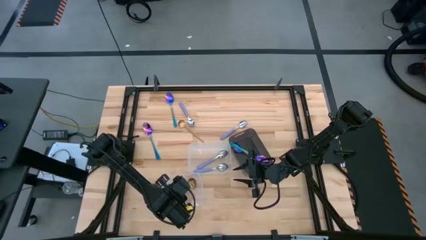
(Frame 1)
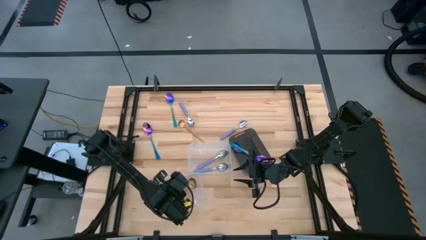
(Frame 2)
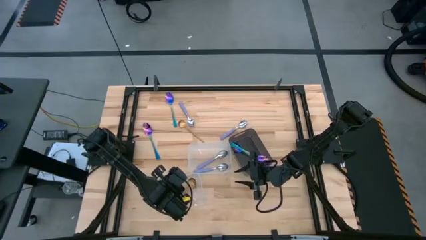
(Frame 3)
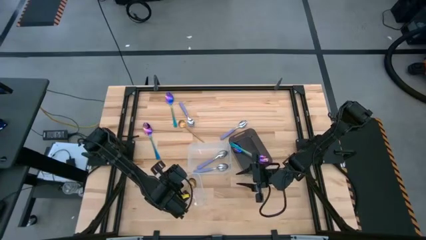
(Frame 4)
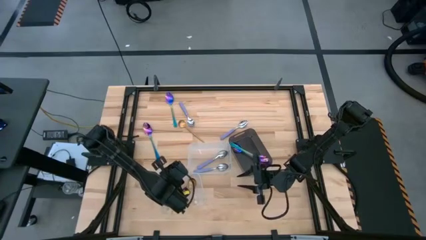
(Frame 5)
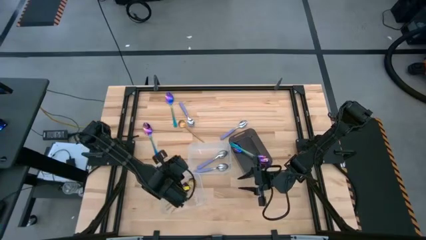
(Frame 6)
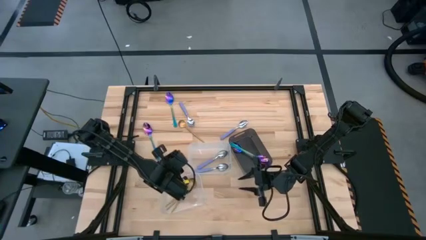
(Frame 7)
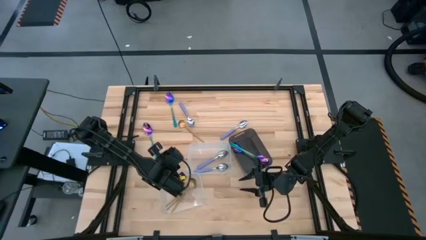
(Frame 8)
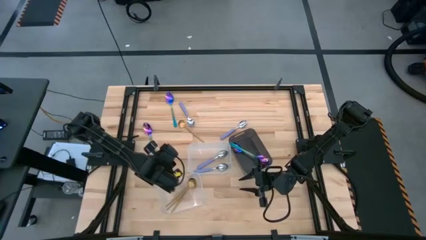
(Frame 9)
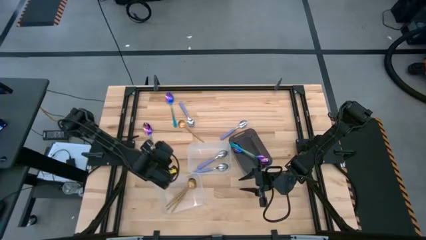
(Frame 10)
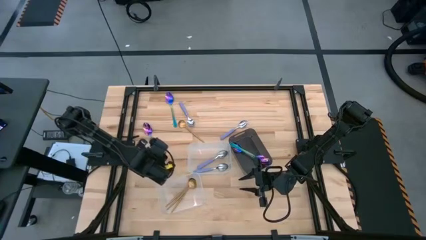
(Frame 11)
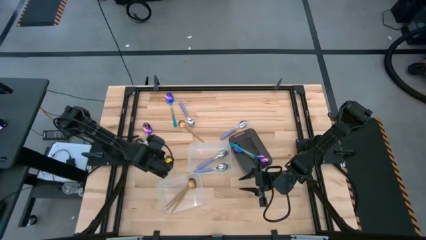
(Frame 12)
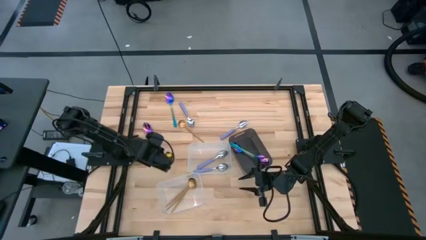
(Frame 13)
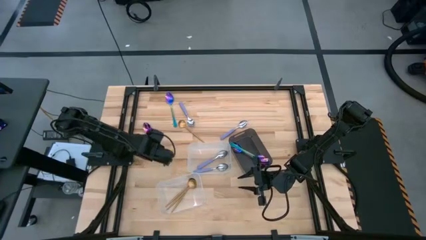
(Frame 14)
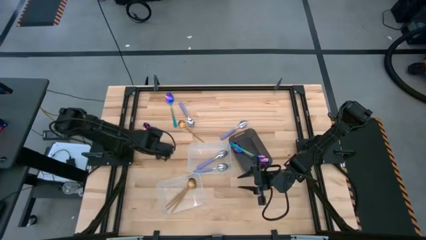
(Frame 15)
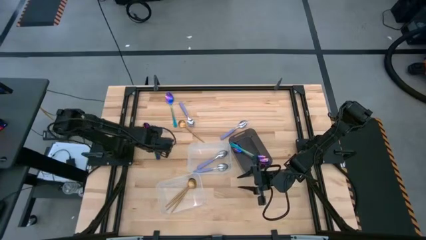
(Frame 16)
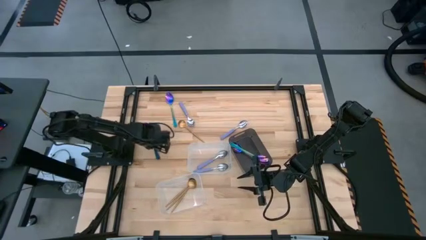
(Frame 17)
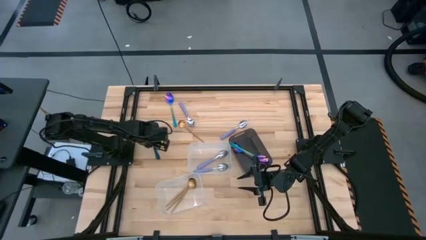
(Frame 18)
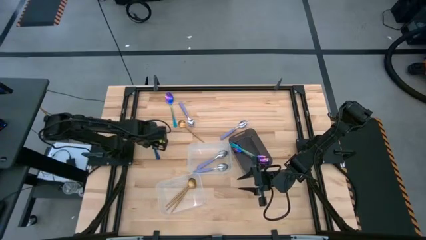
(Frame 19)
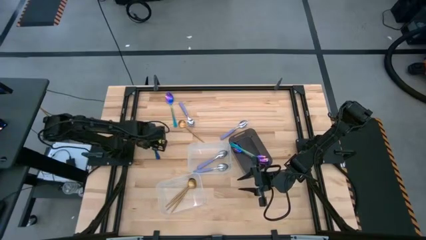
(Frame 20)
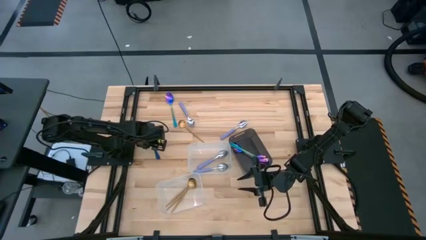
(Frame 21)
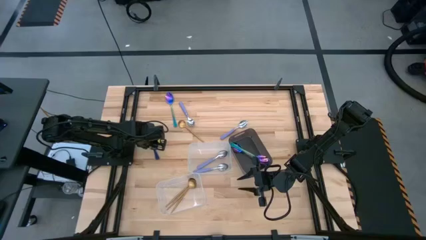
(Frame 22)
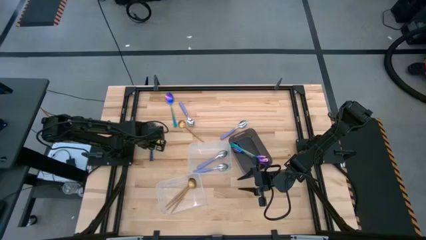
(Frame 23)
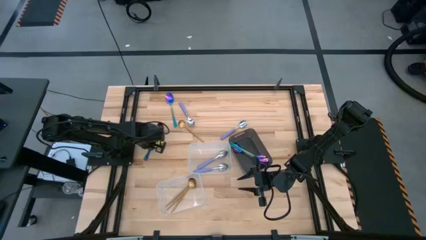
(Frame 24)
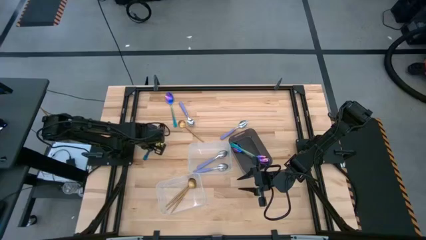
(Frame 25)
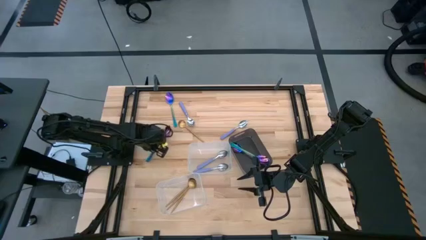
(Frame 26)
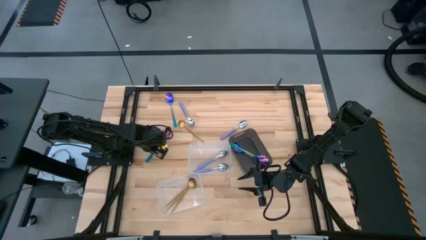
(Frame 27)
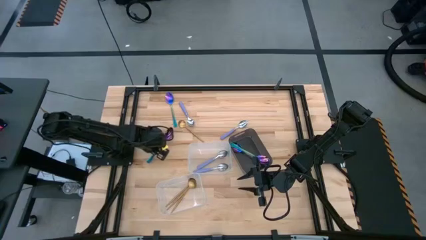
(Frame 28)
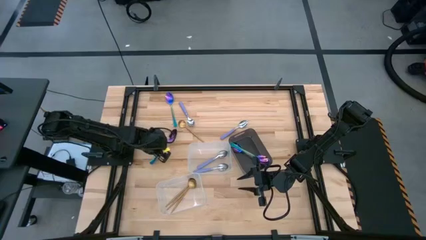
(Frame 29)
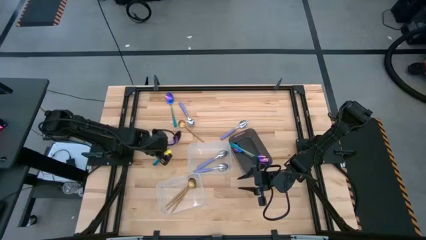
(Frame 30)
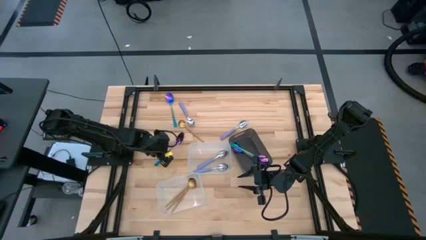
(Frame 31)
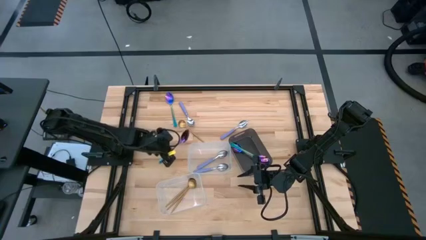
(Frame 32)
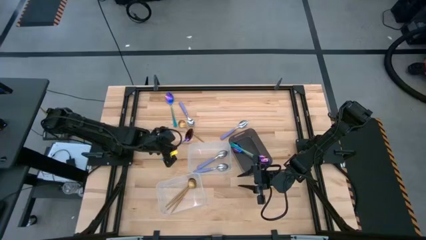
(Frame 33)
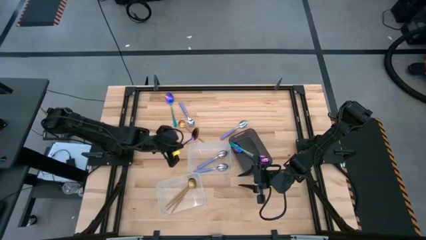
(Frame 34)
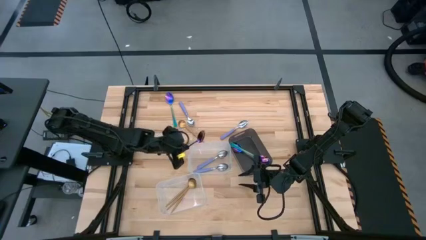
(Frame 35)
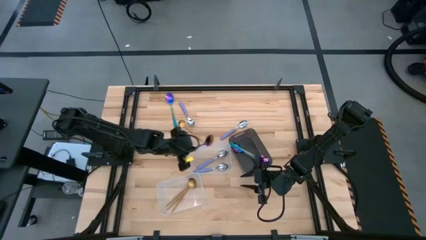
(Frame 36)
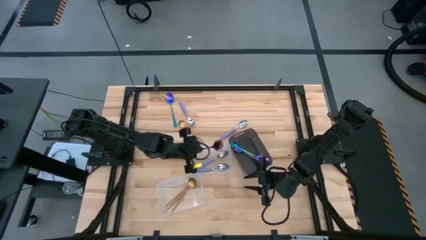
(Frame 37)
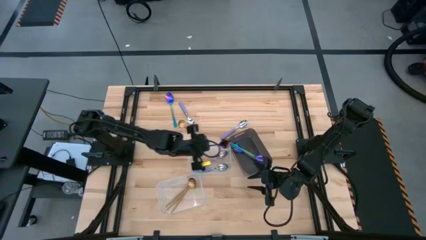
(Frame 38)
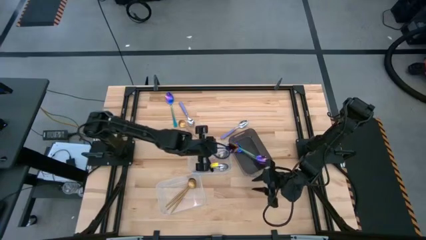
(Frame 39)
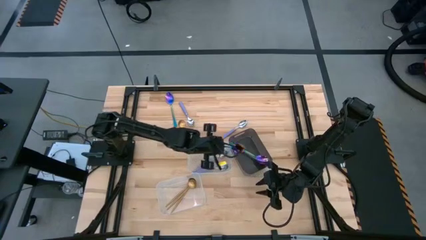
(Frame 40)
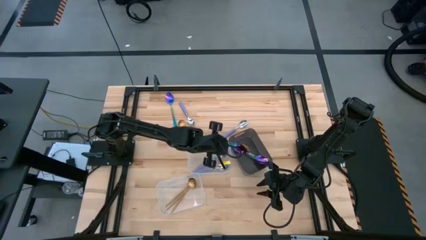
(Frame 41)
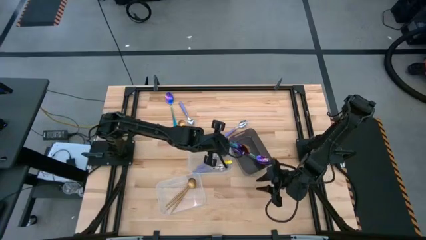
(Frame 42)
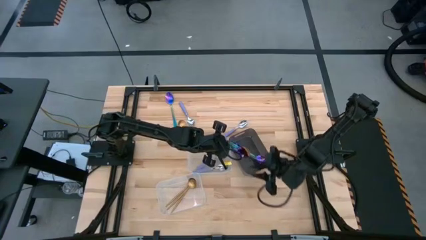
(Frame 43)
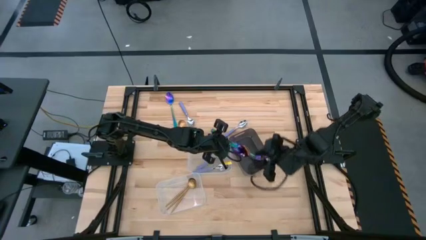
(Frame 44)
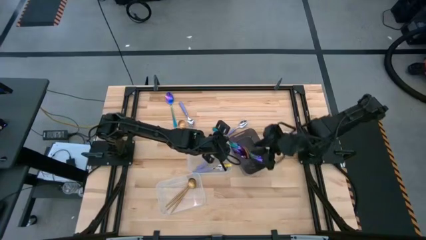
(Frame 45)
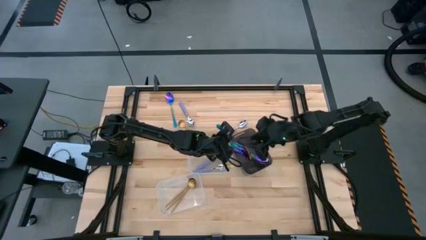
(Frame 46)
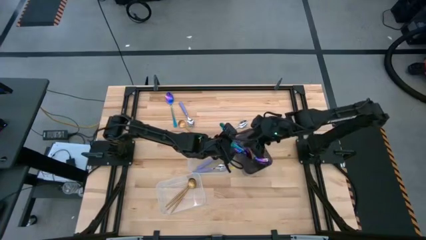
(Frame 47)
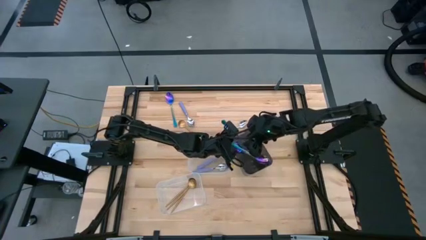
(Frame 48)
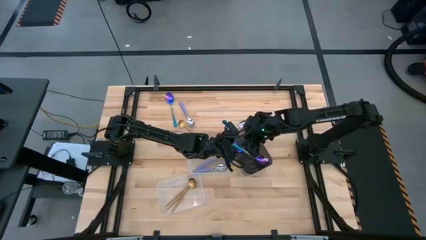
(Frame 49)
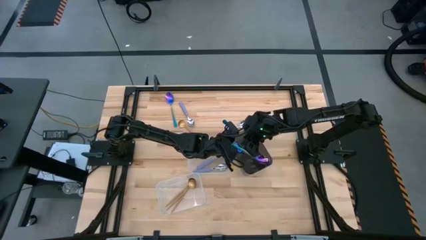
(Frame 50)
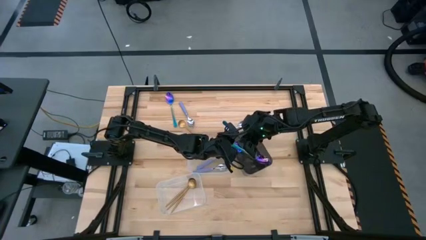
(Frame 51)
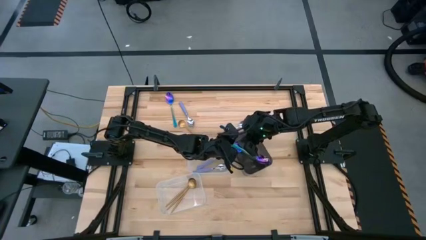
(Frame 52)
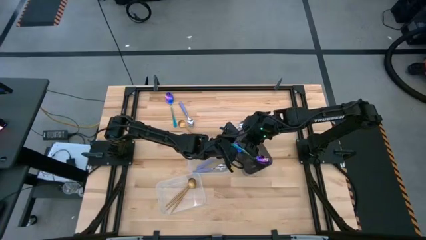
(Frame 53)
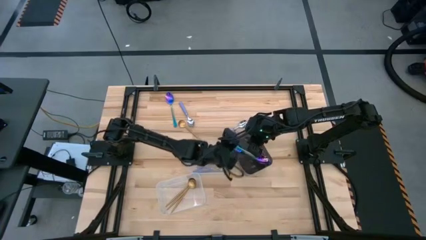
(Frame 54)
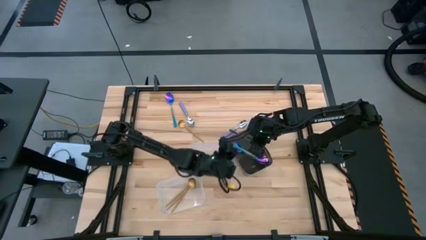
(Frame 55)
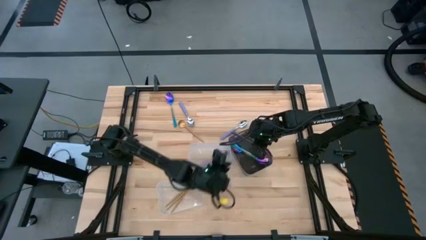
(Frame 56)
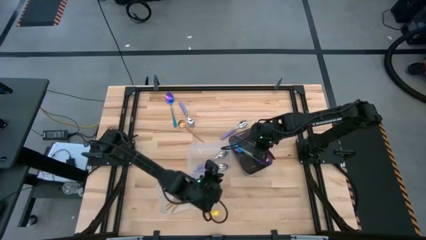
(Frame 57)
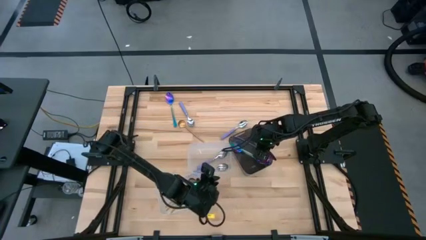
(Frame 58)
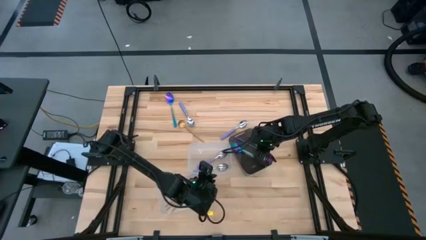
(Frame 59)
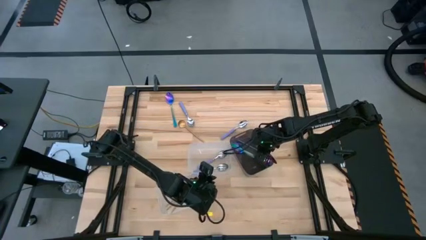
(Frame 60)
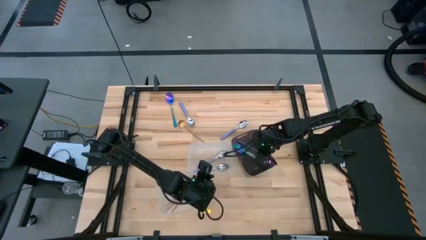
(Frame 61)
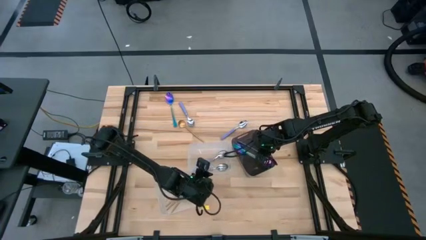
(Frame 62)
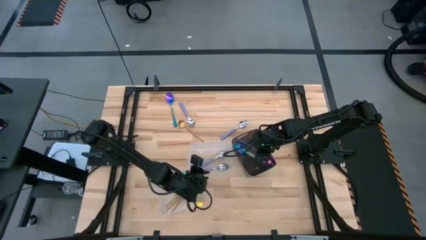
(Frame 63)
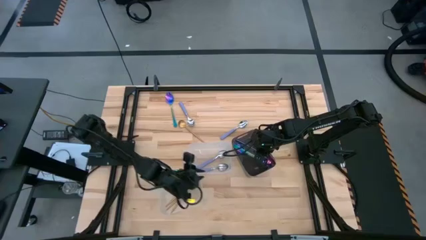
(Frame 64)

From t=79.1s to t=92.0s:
Task: Sort silverware by color (type)
Put the violet spoon into the black bin

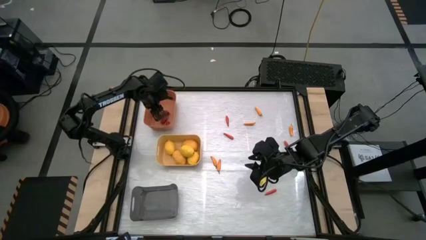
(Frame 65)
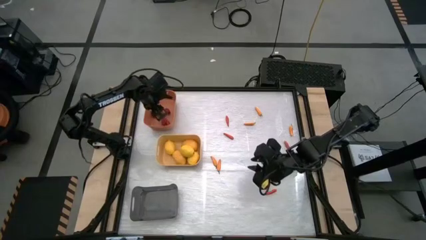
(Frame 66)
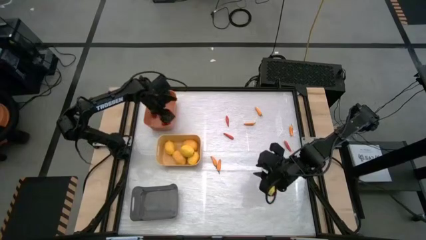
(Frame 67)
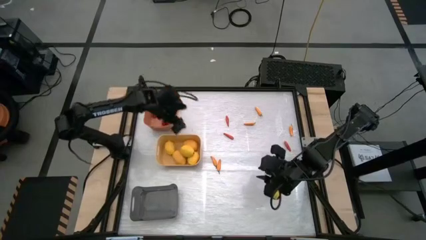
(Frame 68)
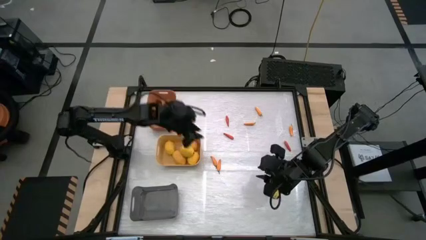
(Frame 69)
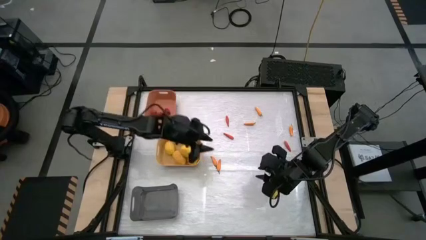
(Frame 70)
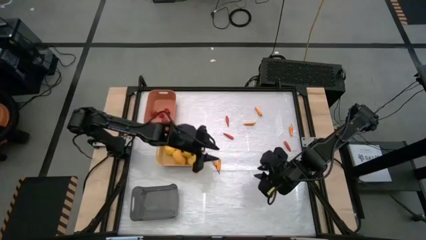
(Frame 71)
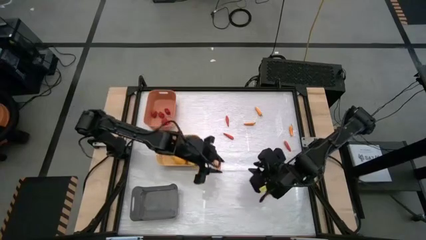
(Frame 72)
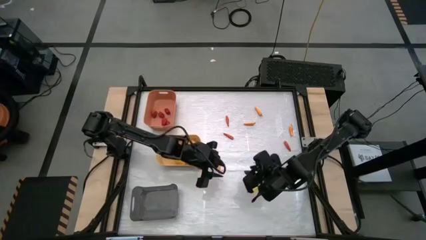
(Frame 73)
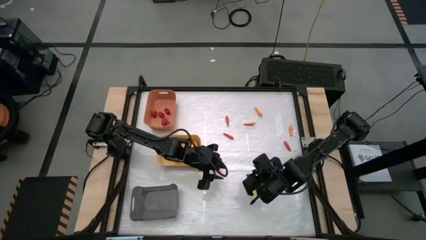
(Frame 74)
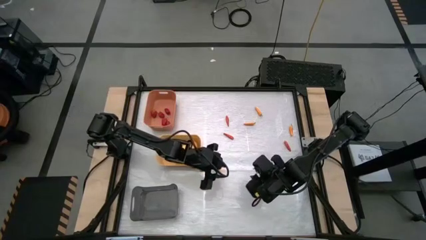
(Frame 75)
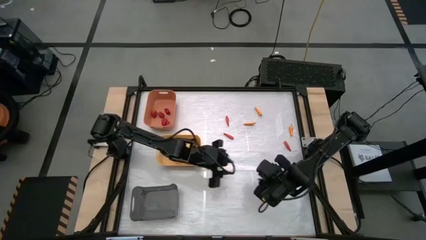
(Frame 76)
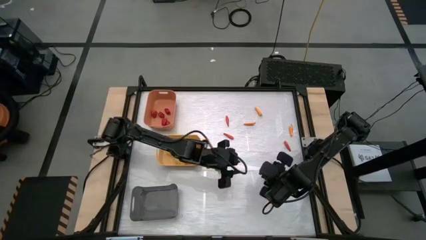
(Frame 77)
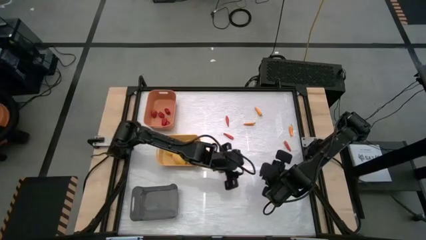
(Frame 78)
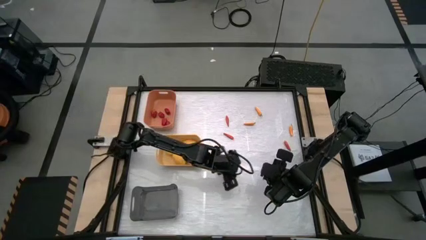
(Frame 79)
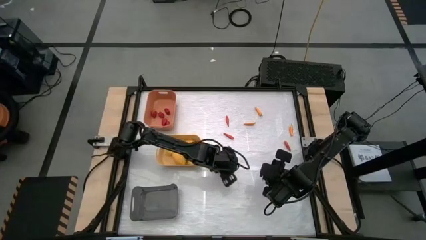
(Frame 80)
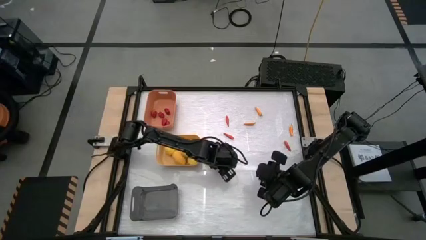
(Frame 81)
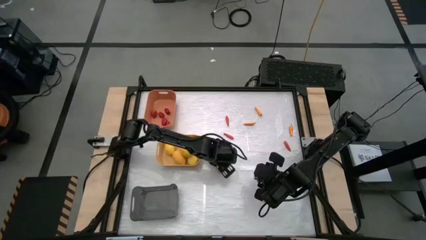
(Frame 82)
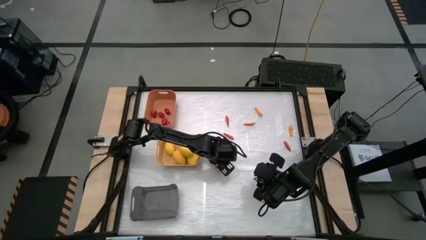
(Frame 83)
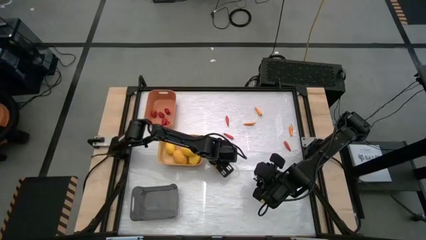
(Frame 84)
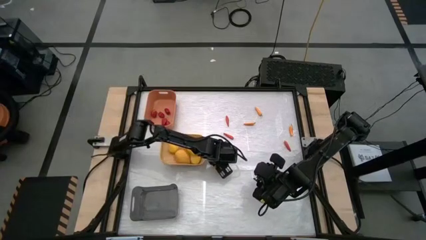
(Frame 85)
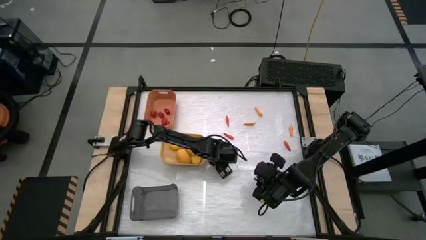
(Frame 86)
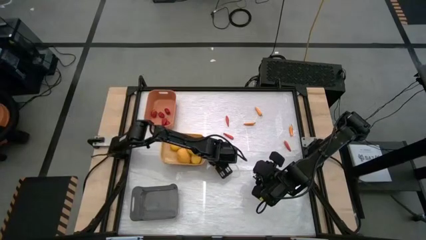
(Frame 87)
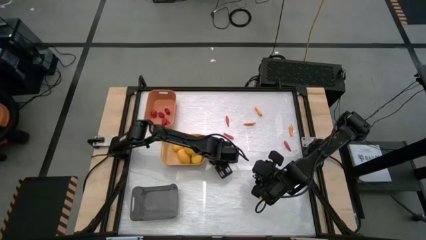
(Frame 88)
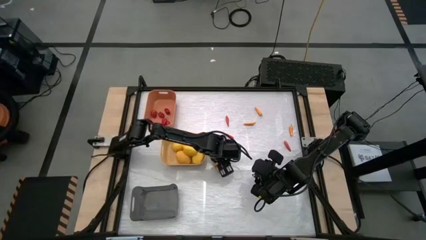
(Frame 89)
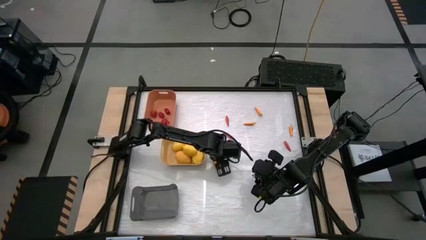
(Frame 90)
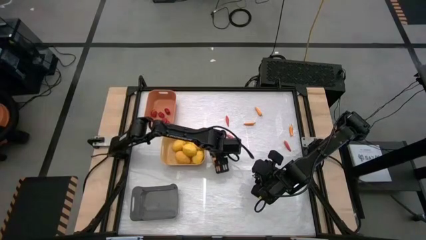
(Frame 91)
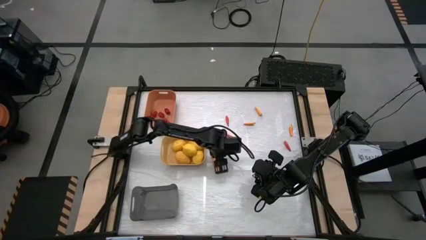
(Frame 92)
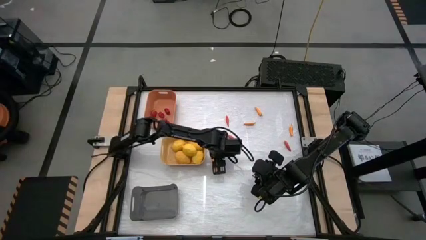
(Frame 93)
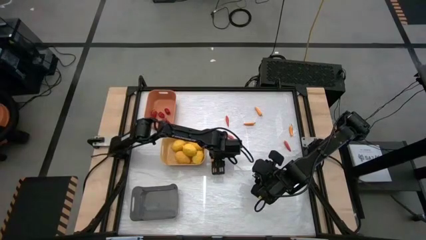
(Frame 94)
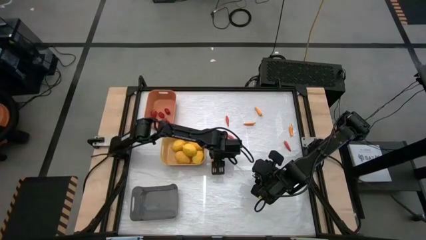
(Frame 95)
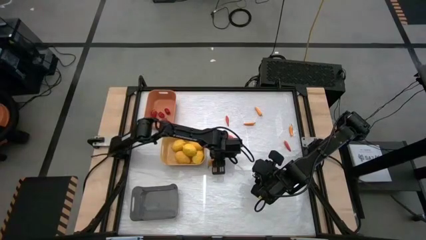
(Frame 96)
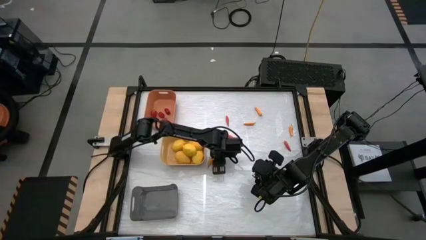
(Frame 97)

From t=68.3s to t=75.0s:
Task: Sort produce into baskets
Put the yellow chili pepper into the gray bin
